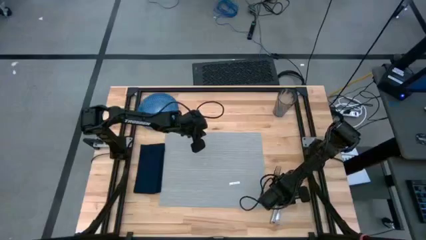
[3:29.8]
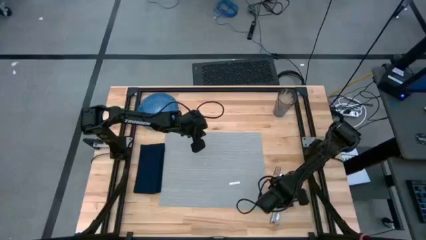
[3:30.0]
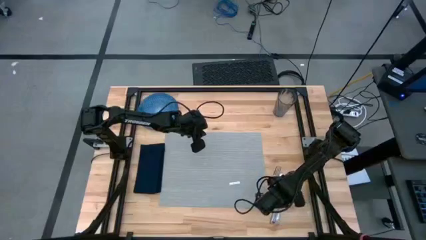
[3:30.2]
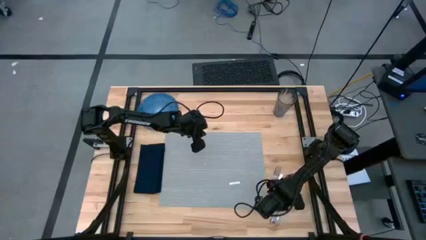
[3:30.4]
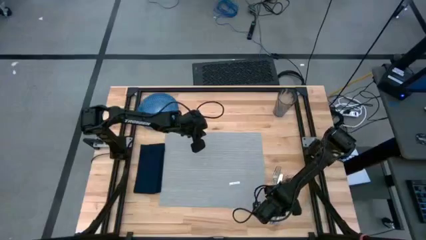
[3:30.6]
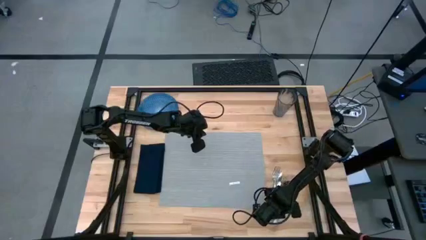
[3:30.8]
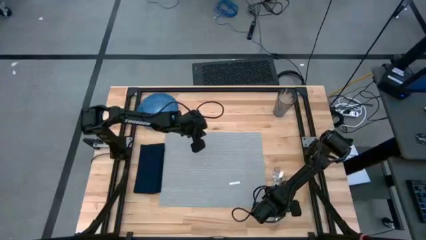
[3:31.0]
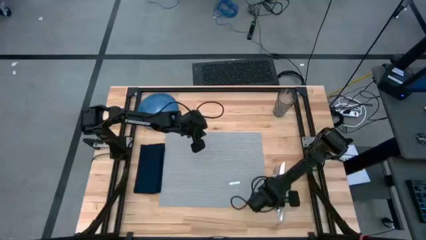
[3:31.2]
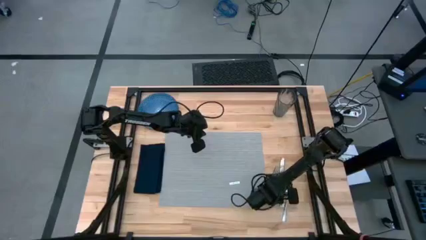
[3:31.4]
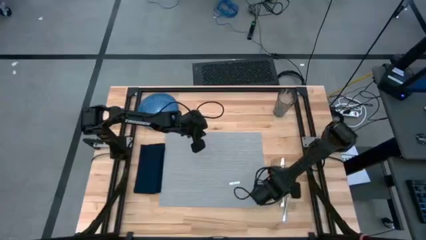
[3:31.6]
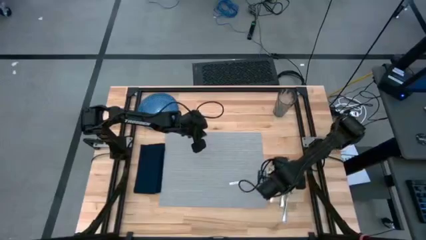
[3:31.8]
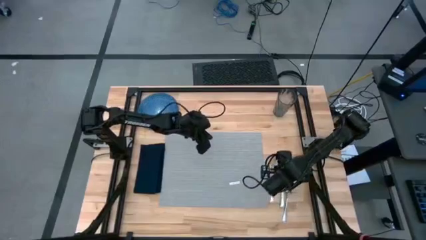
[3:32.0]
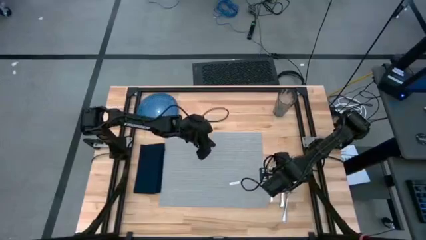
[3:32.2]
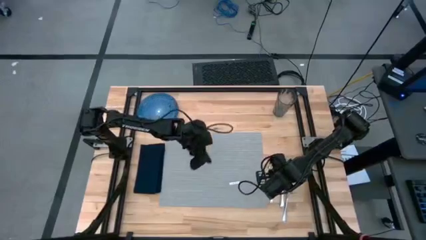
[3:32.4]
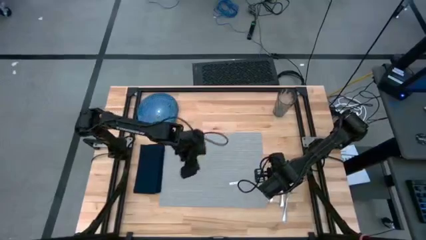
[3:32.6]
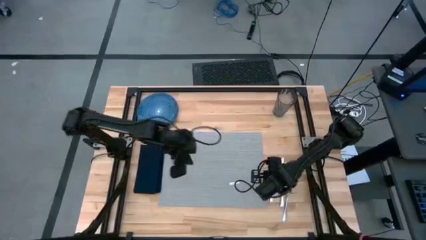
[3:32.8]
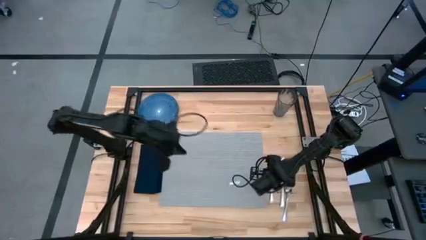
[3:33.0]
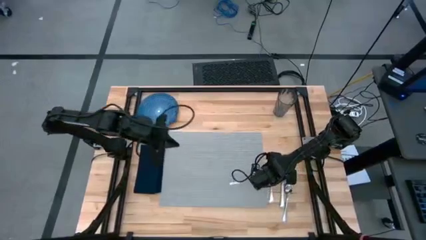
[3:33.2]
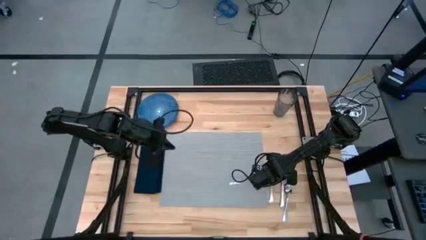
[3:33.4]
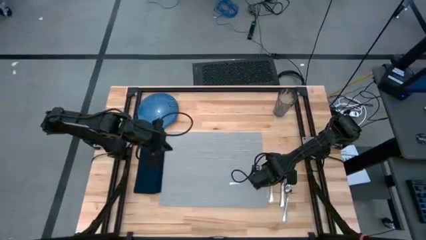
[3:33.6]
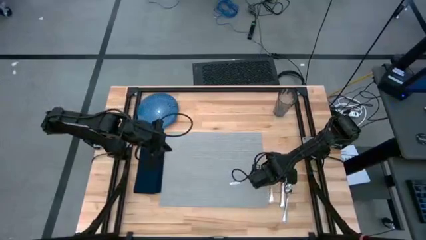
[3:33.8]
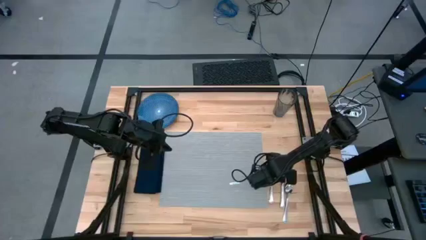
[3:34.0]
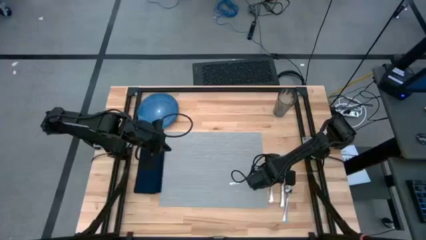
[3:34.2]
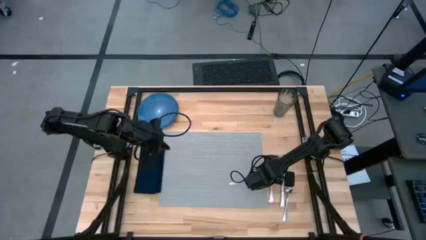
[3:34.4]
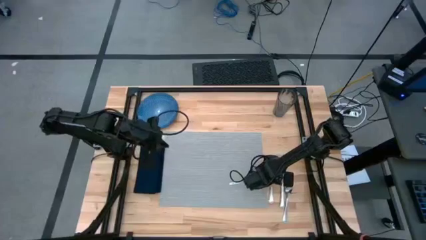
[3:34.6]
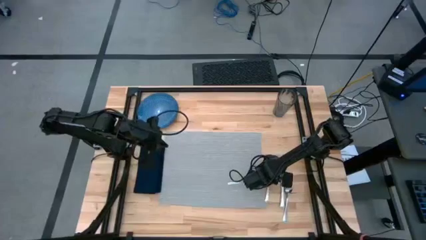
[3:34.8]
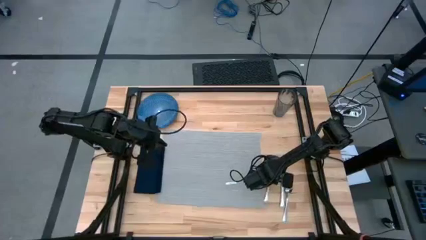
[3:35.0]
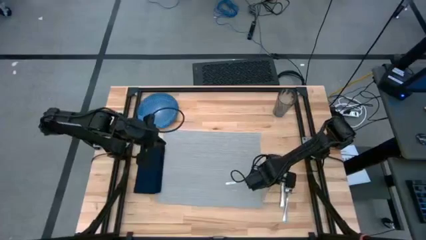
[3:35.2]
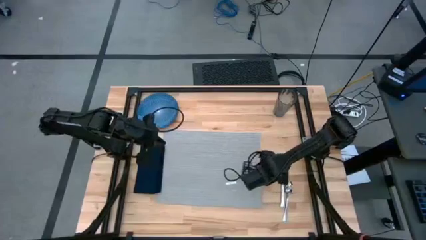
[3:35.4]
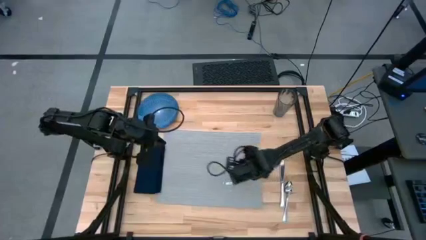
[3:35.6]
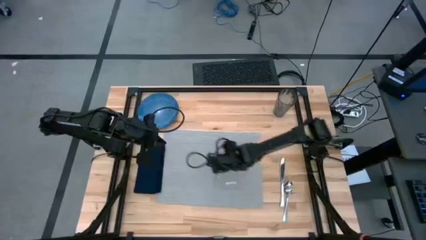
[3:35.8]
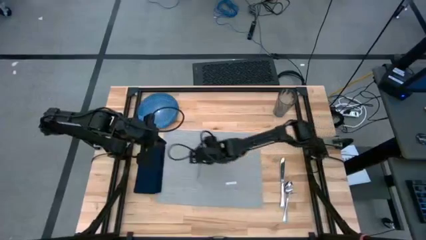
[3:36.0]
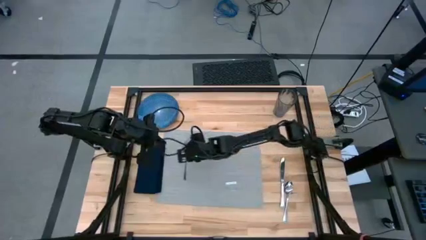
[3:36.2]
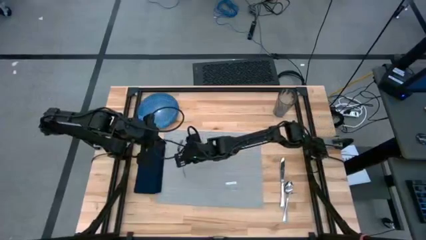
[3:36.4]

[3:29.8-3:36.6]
Task: Set table place
Put the silver fork on the left side of the gray placemat

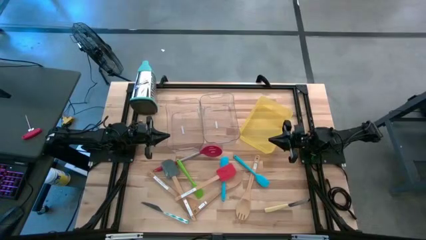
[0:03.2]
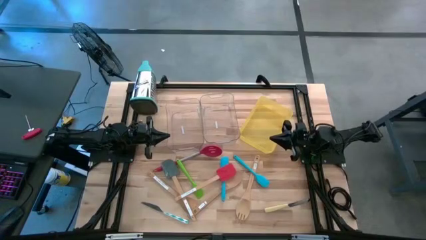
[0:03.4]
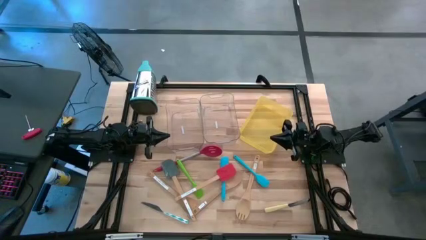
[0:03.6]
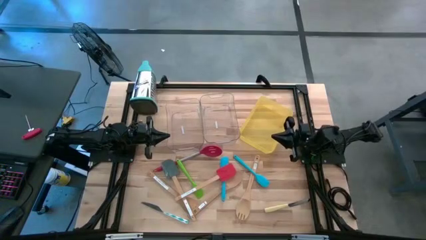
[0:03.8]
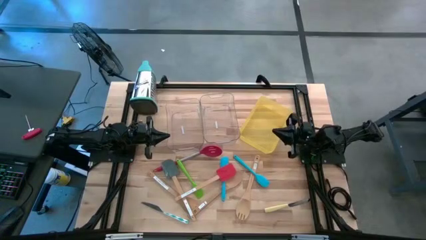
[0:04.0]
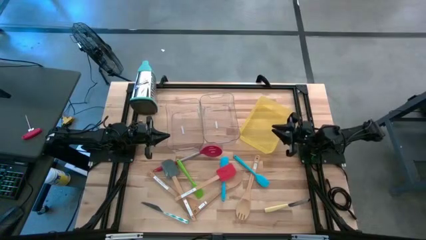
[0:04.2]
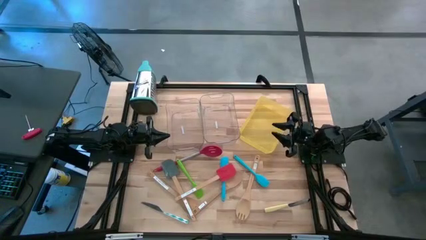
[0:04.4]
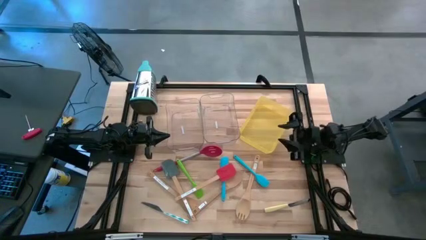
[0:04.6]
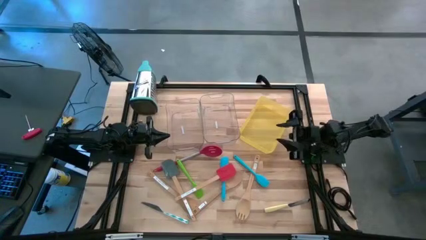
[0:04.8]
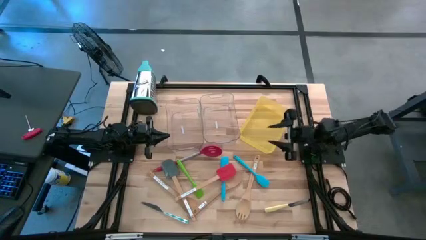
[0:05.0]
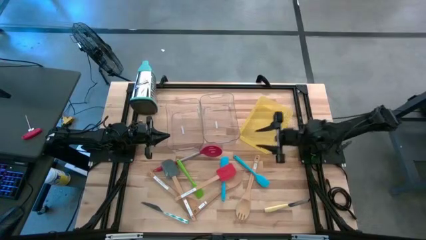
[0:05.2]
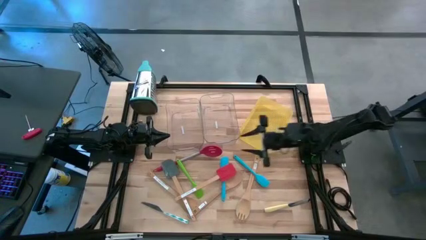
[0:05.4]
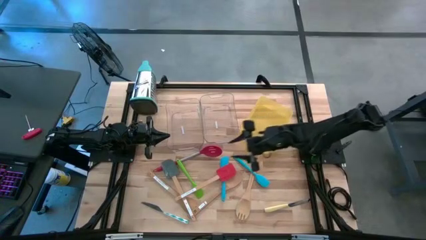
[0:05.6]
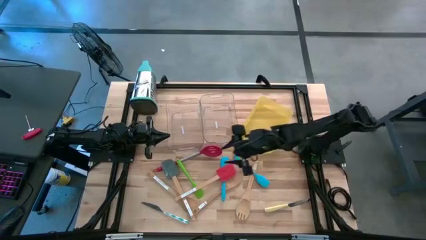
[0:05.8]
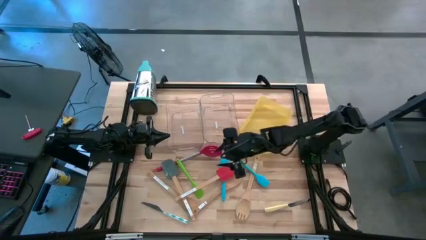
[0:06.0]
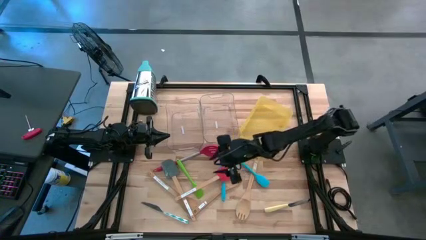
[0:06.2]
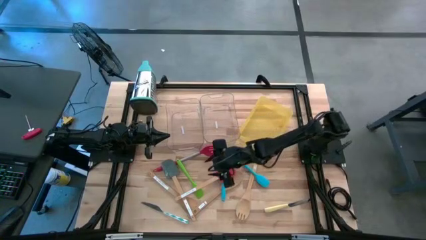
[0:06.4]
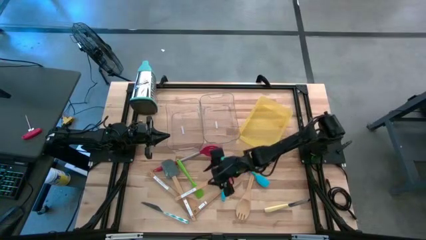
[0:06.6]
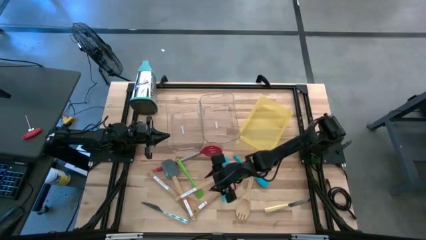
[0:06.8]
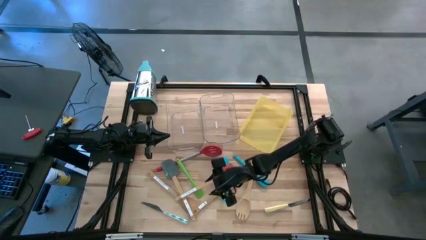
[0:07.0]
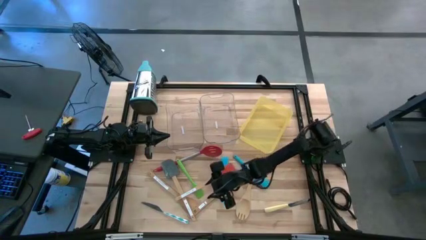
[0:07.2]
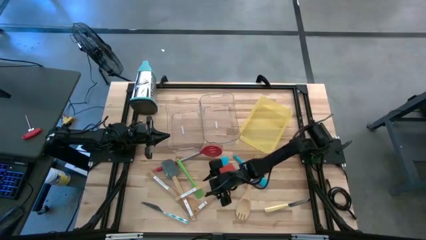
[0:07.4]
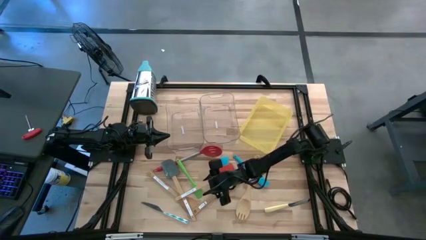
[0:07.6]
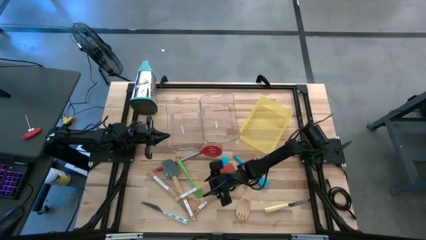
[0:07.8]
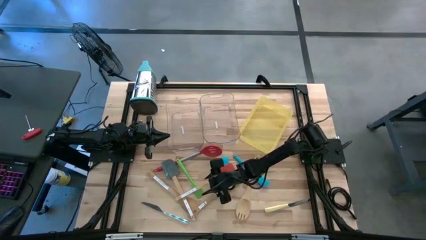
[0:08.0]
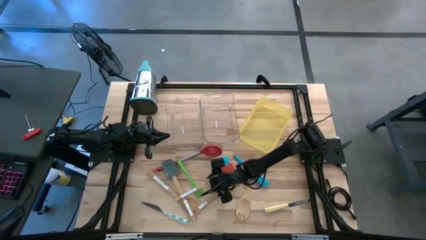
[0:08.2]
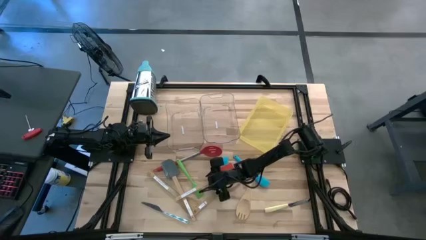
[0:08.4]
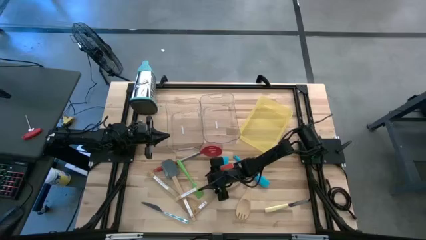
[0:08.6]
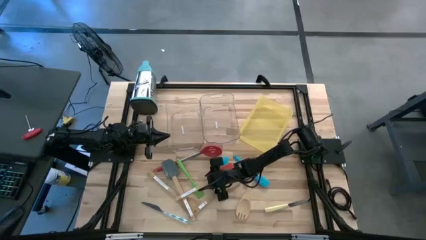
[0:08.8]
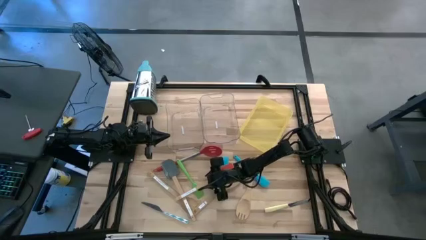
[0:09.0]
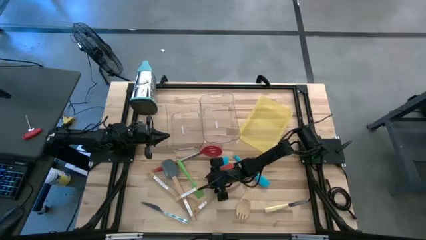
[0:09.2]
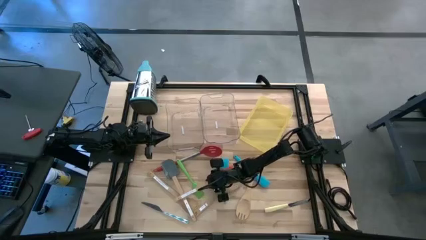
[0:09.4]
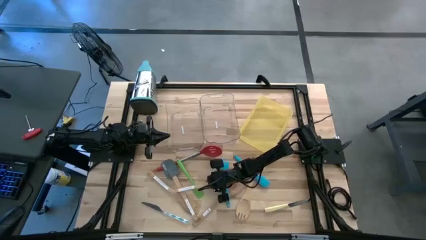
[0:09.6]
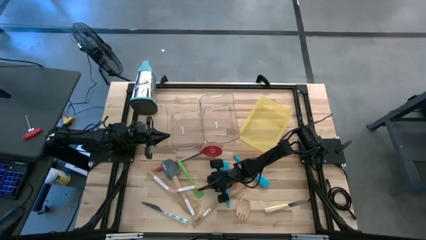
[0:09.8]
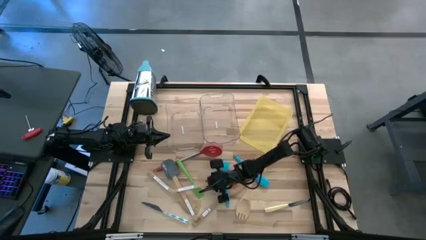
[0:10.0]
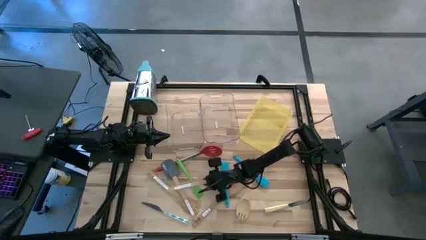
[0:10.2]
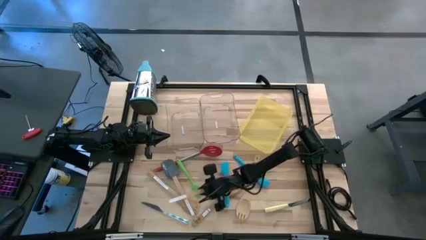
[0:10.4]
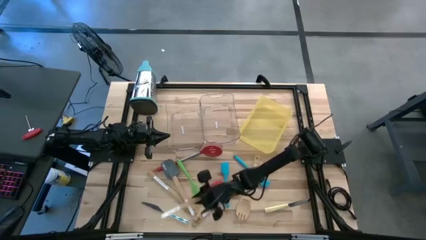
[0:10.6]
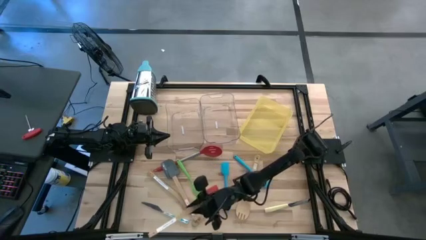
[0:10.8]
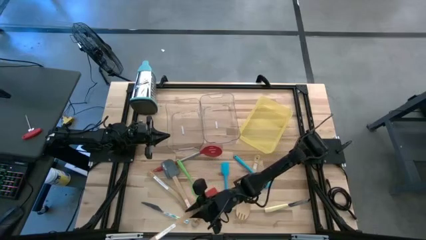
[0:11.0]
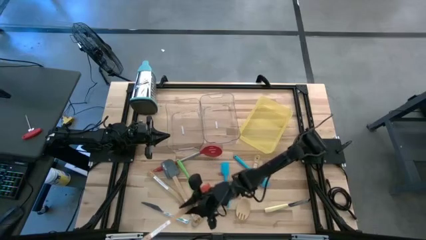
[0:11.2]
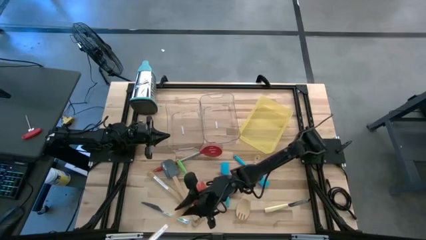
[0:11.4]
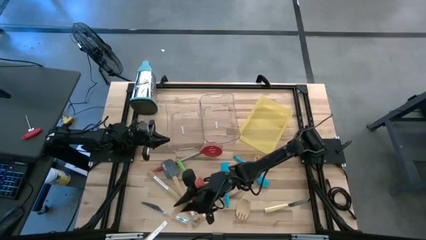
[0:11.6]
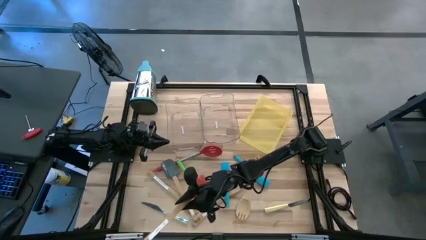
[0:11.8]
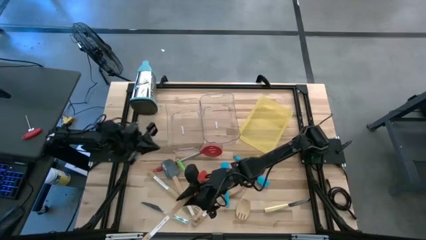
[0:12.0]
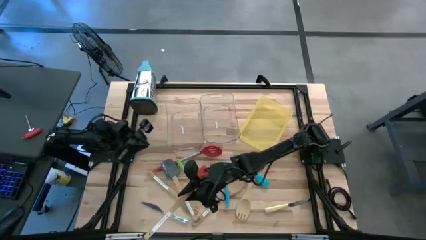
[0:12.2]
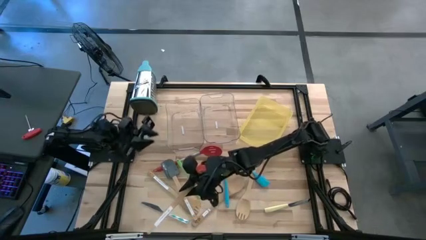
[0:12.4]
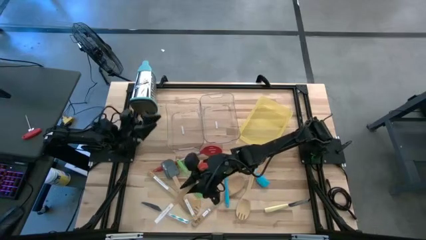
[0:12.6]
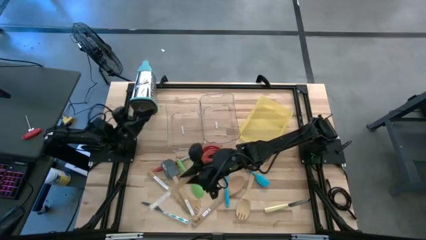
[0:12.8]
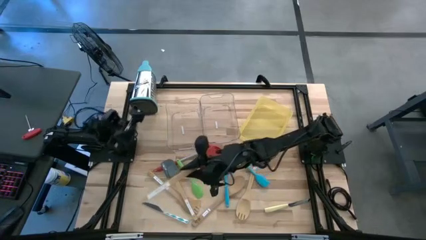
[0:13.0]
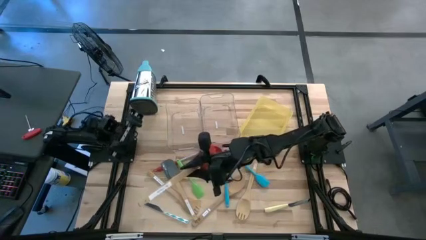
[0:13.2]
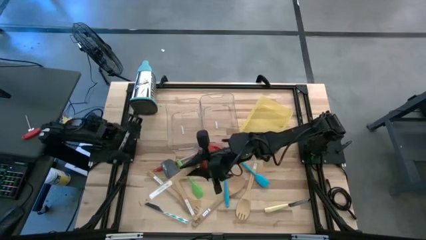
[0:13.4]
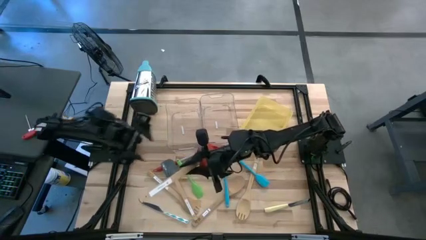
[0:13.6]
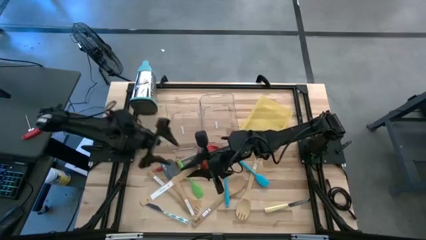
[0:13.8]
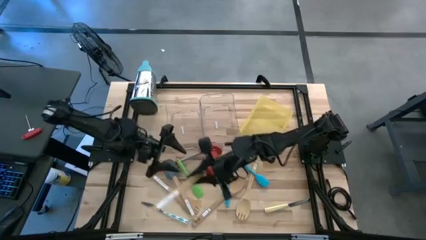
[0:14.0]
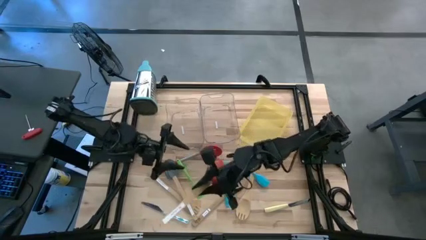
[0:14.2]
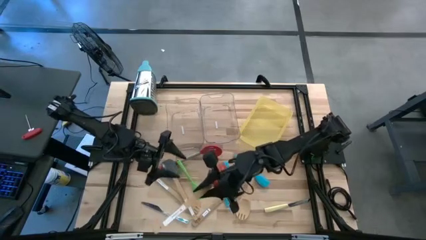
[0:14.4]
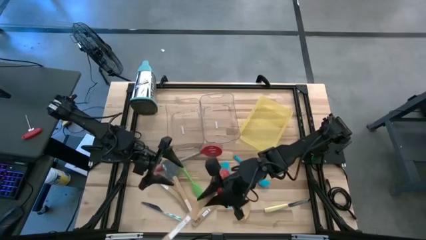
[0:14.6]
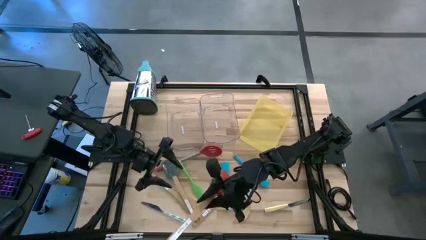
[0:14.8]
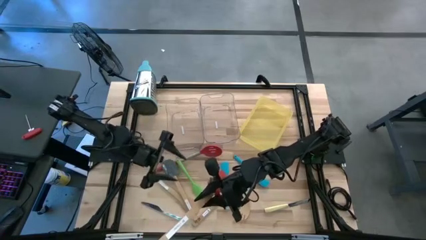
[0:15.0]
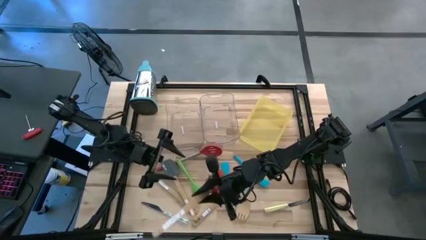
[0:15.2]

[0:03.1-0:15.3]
Task: Pick & Place Kitchen Items
Put the orange spatula into the left transparent bin
